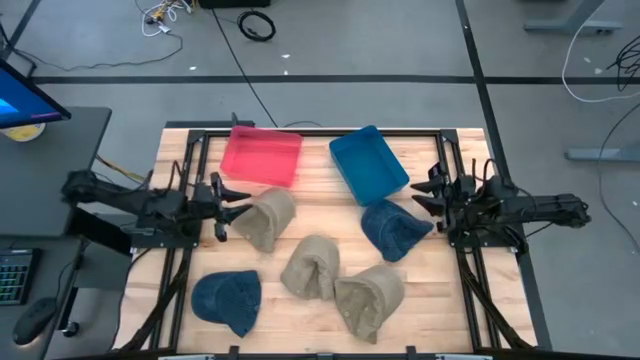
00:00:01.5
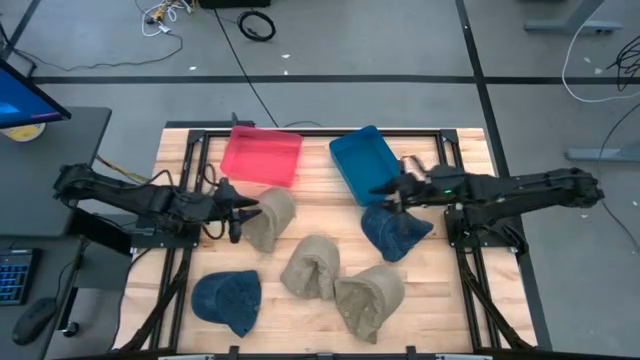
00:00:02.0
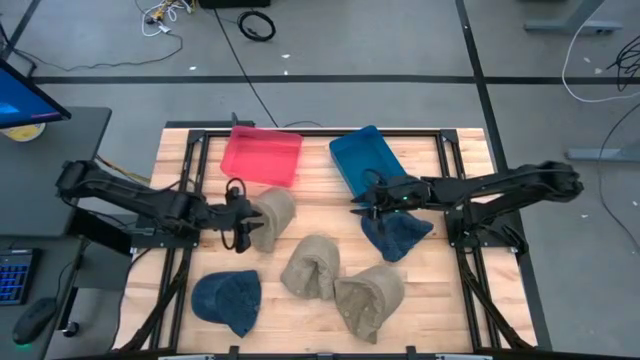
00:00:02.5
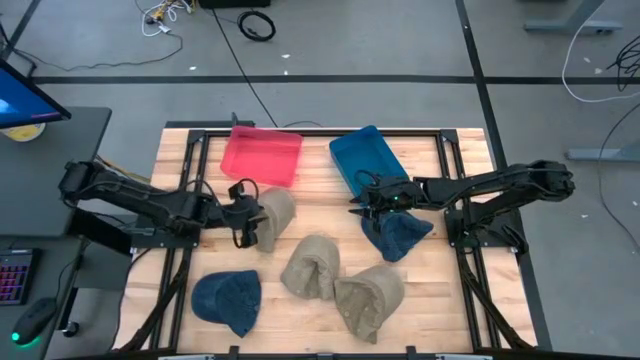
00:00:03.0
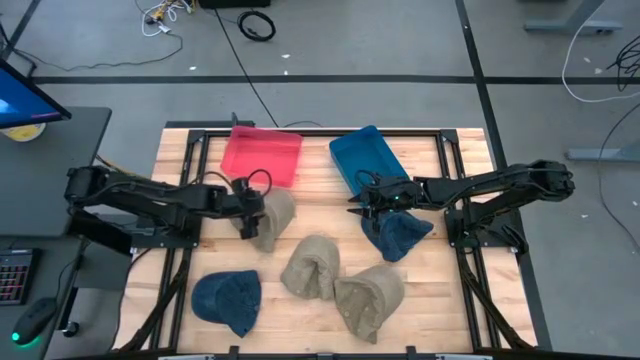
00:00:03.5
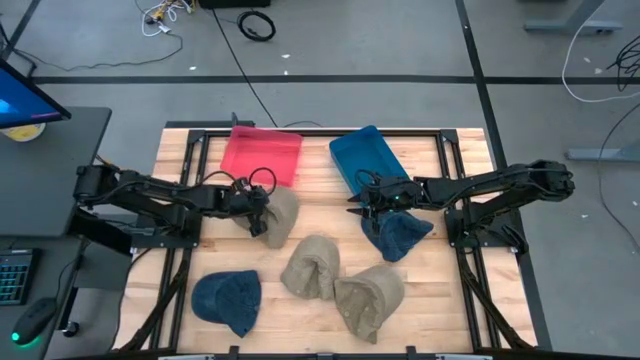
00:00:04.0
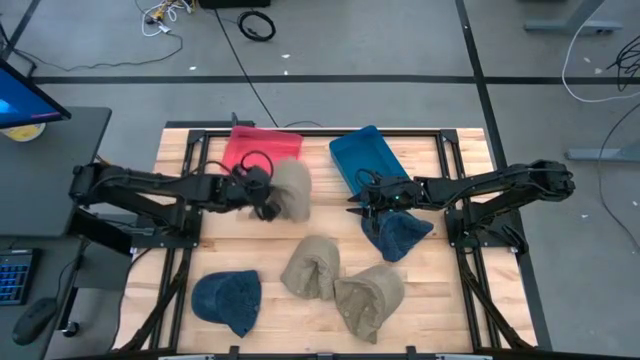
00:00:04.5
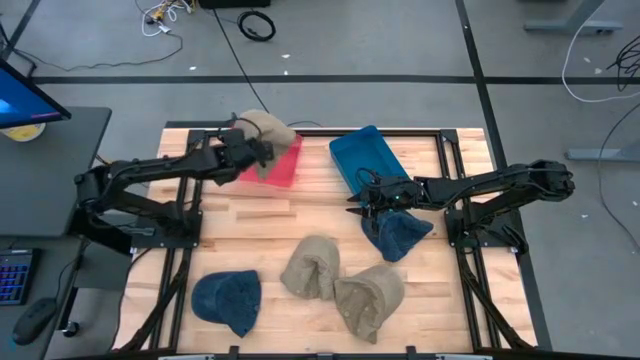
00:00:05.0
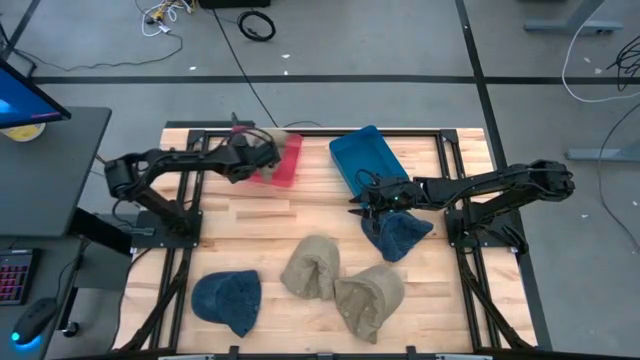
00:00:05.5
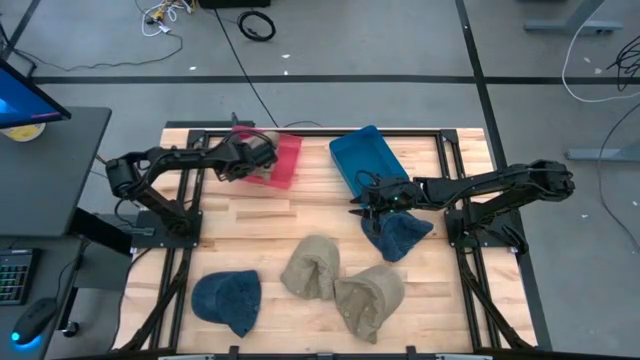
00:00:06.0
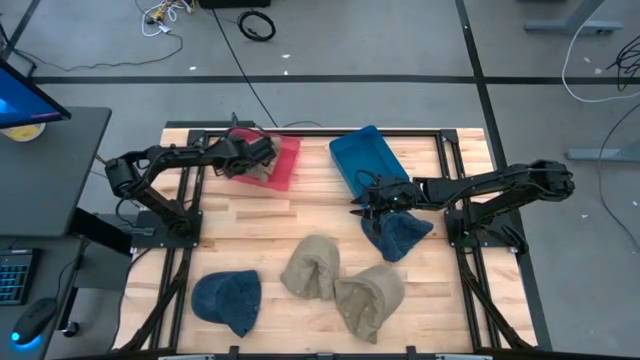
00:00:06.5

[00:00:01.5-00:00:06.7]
Task: Pick & Place hat
Put the top brown cap into the red bin

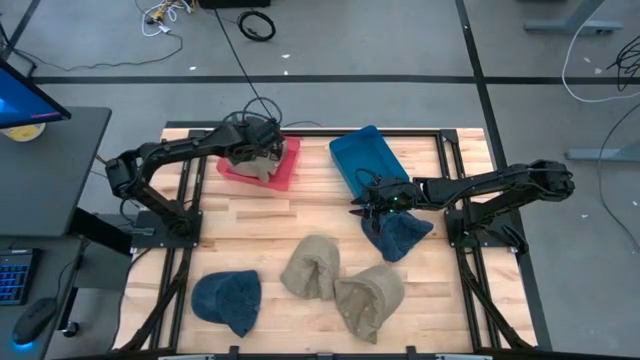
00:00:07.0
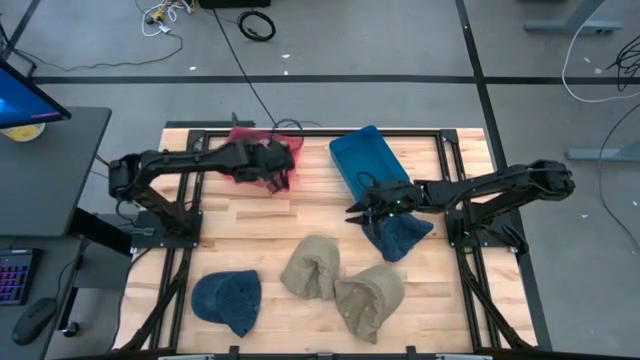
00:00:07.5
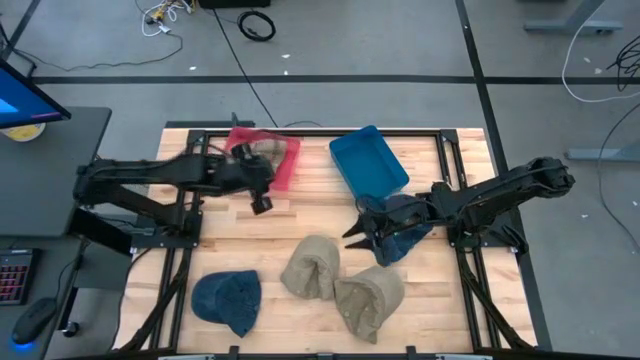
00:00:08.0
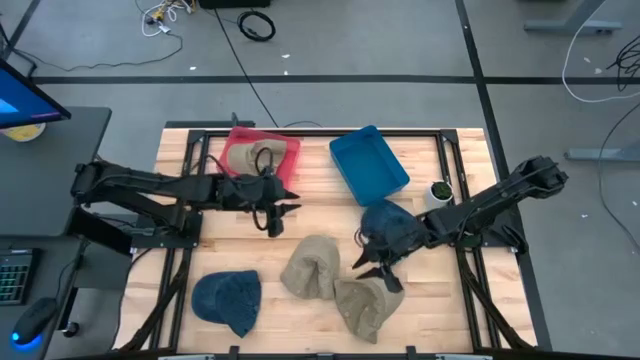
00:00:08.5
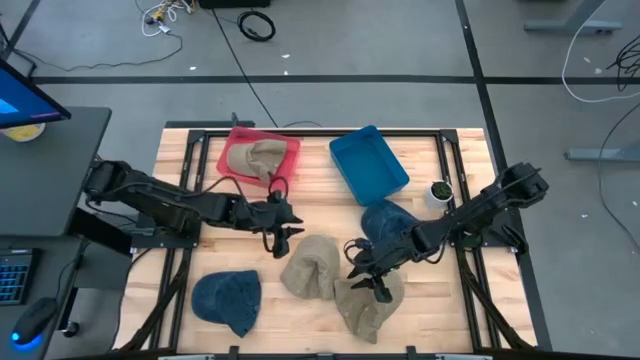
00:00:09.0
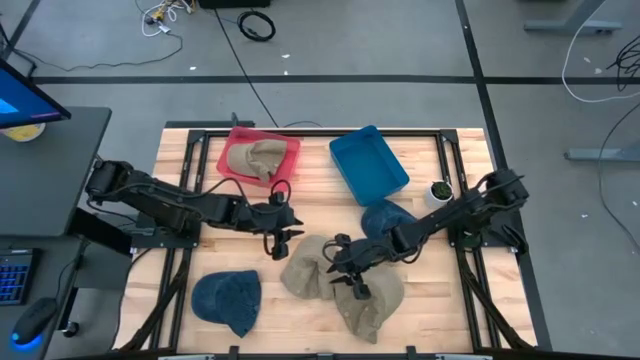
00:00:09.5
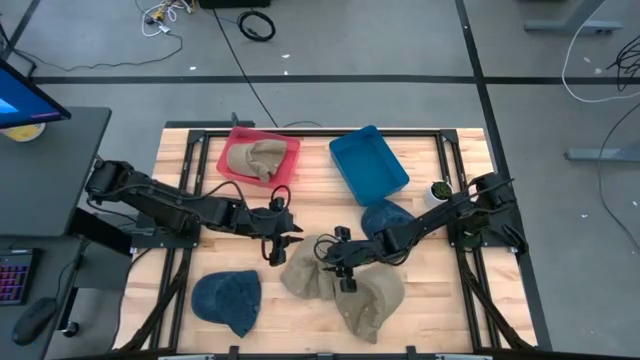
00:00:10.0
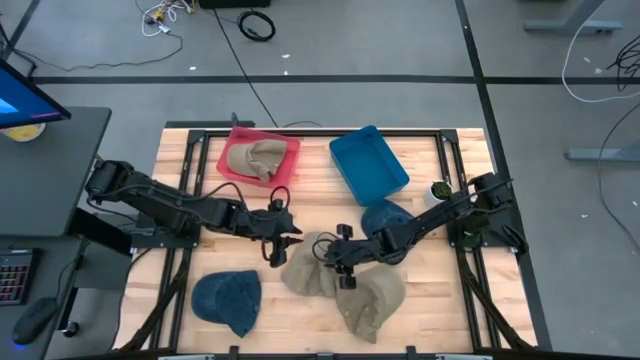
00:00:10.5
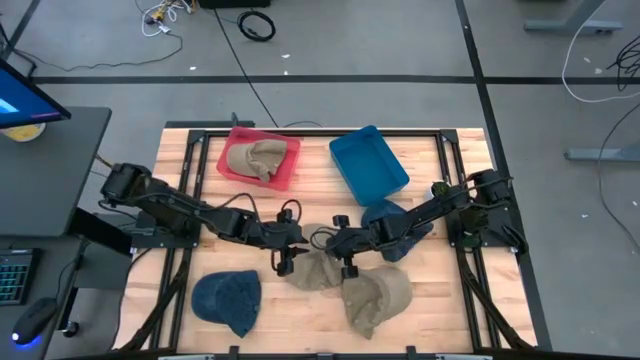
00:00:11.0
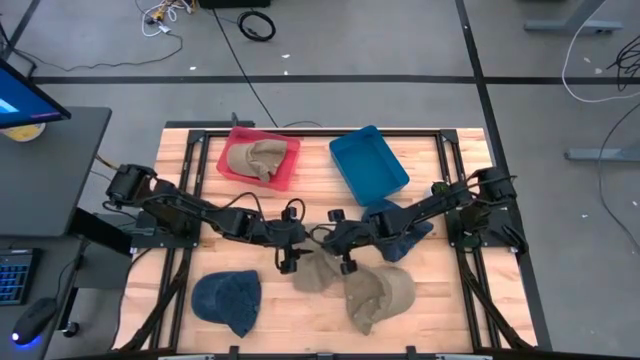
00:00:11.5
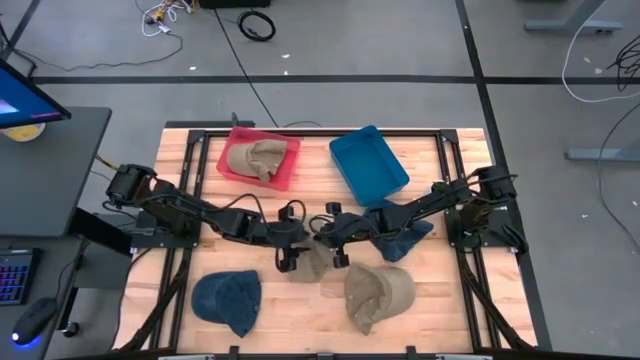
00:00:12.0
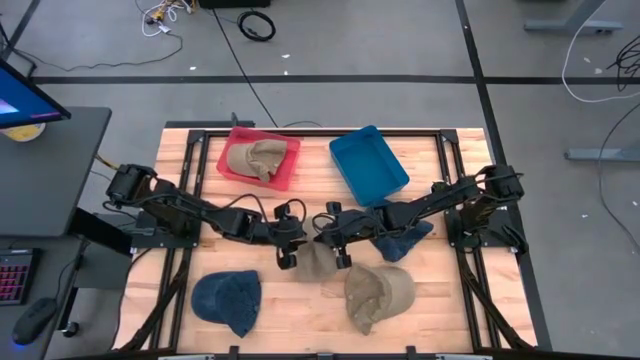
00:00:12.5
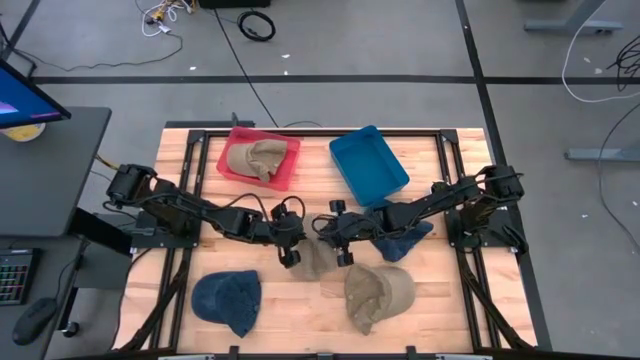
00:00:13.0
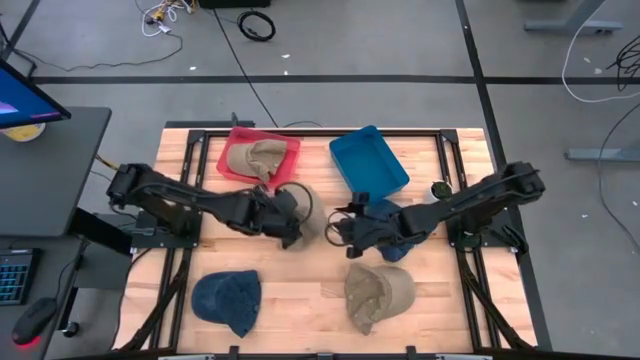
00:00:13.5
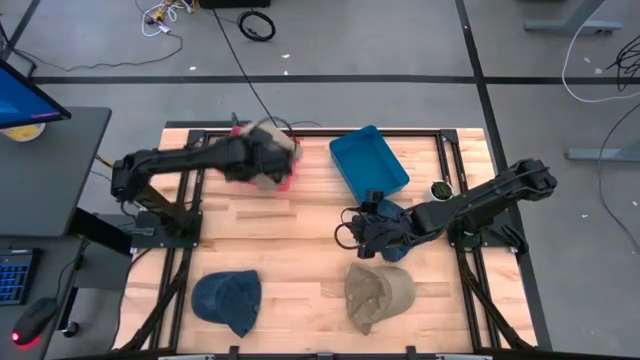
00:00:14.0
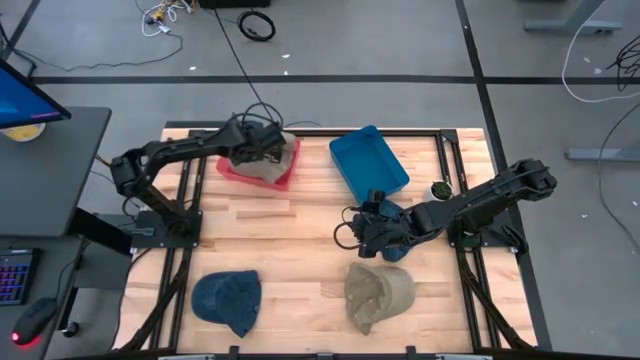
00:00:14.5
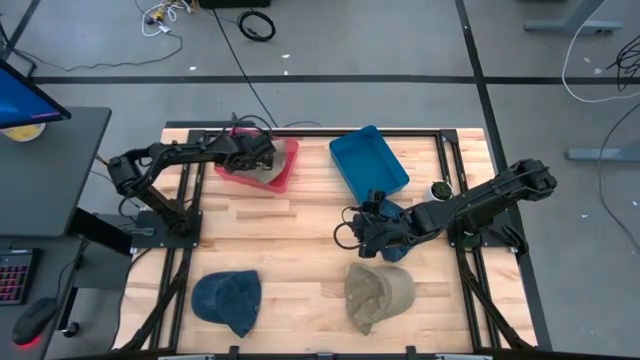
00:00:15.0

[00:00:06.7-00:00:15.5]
Put the left brown cap into the red bin

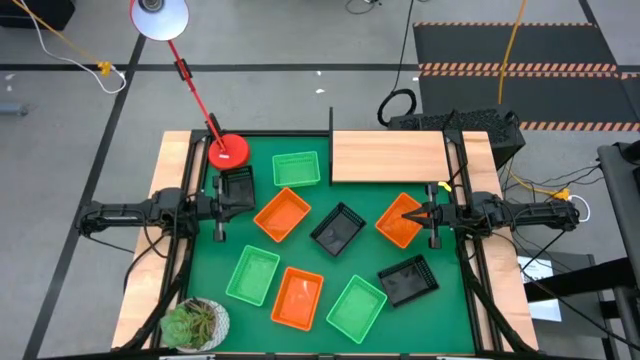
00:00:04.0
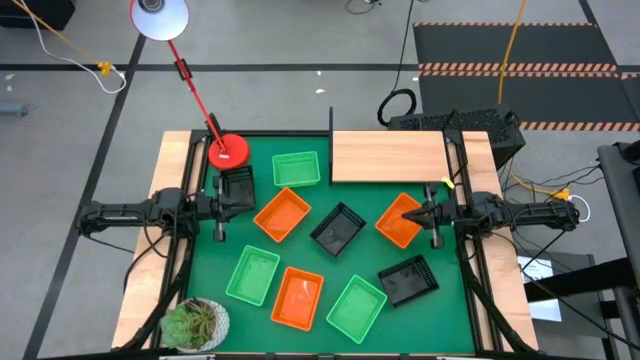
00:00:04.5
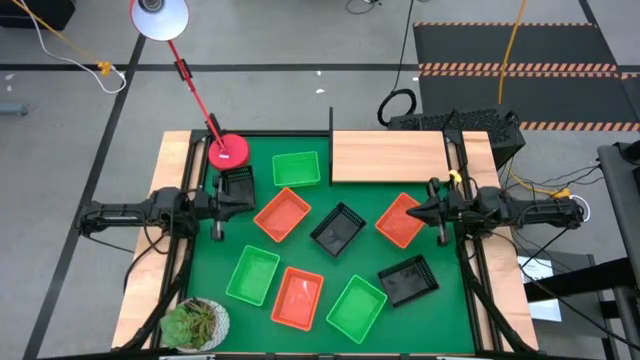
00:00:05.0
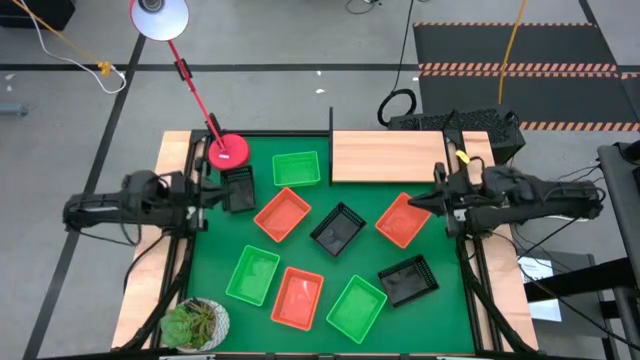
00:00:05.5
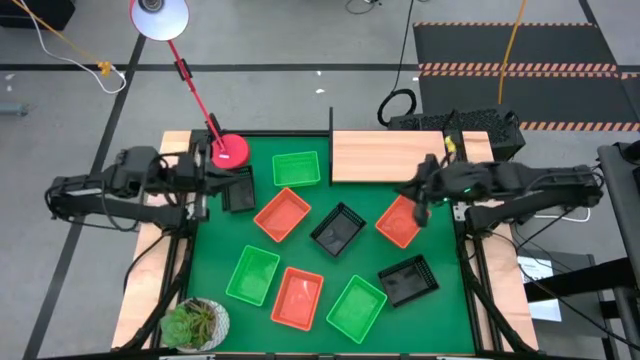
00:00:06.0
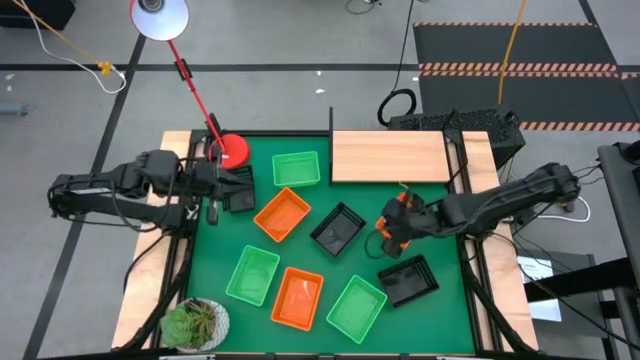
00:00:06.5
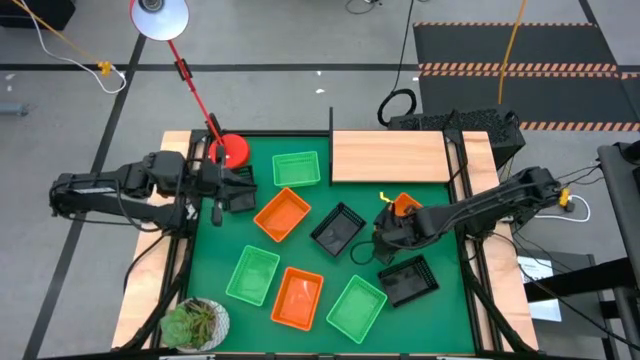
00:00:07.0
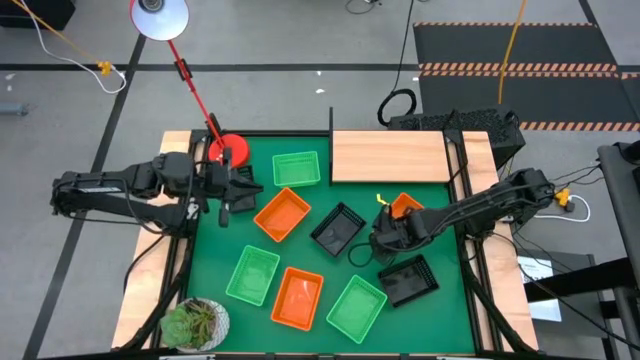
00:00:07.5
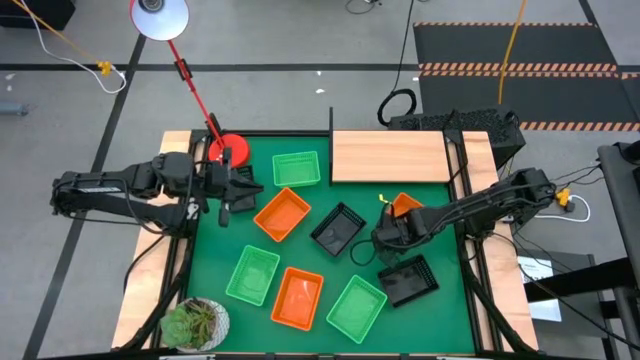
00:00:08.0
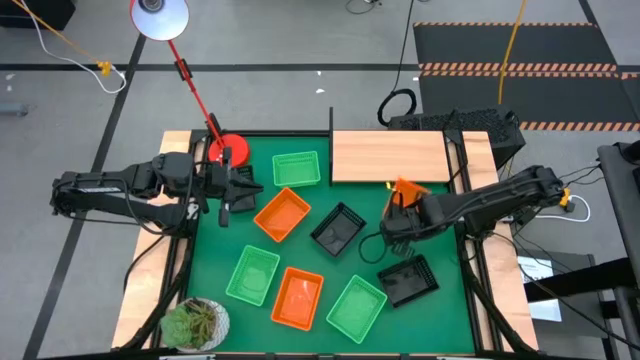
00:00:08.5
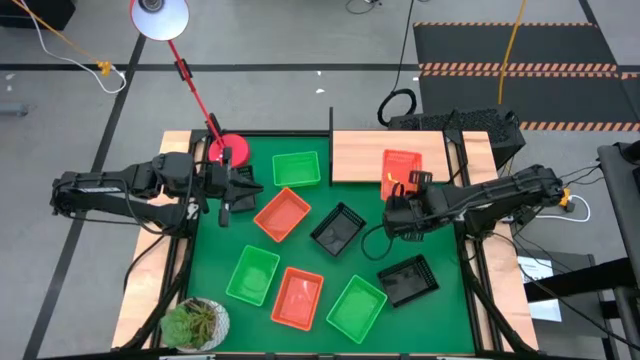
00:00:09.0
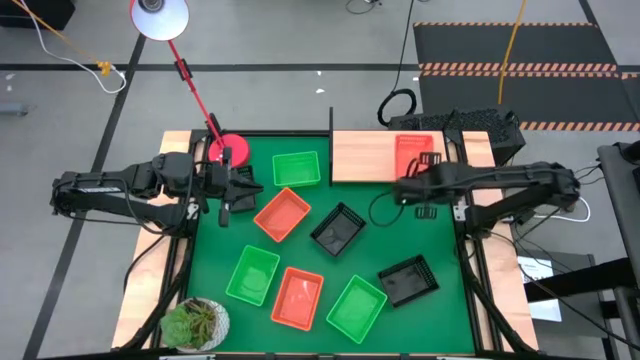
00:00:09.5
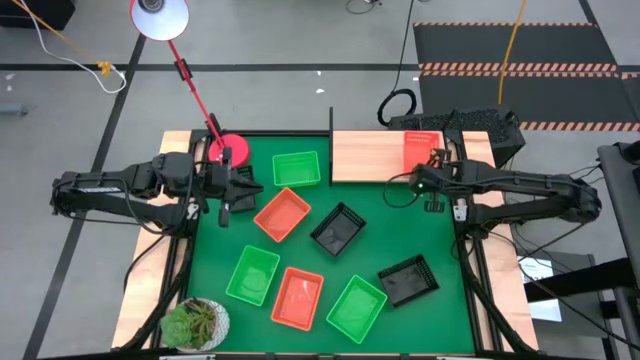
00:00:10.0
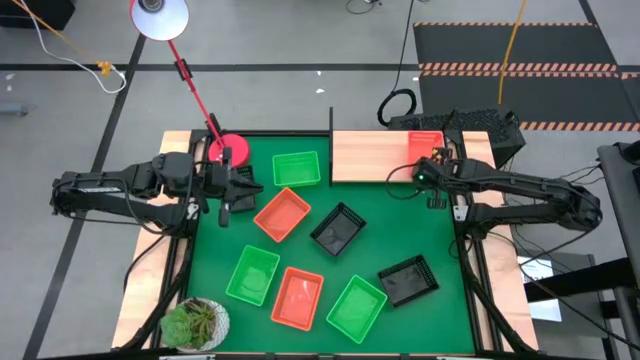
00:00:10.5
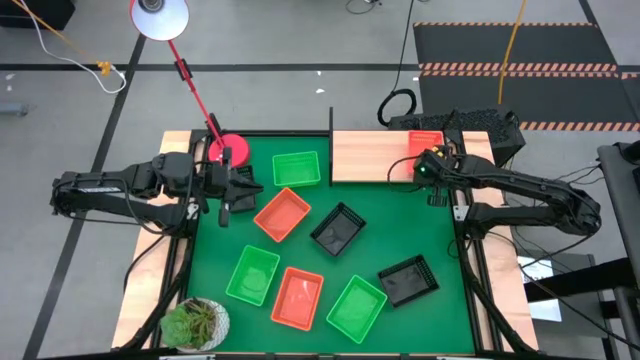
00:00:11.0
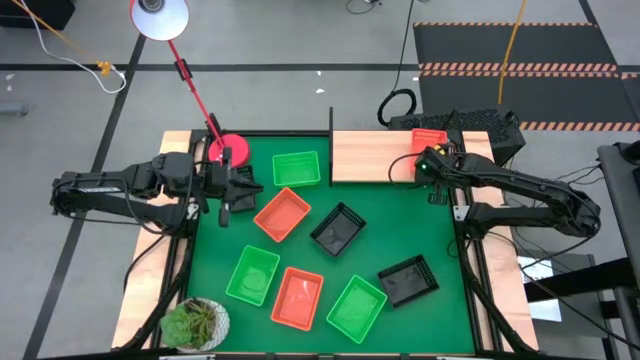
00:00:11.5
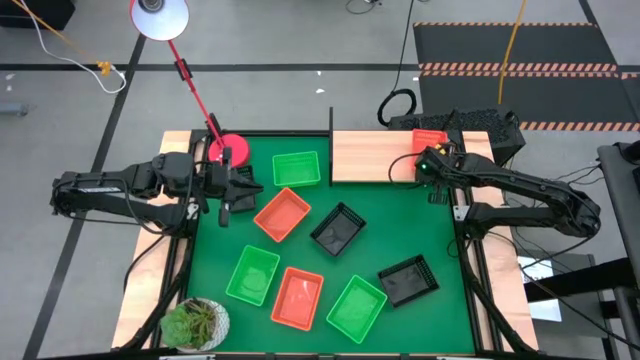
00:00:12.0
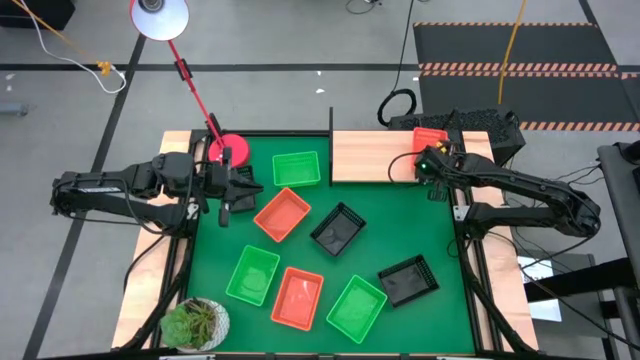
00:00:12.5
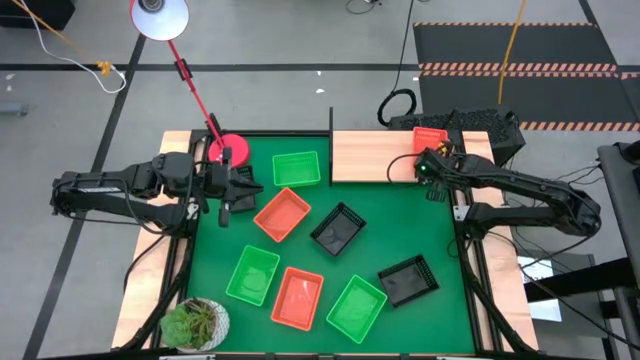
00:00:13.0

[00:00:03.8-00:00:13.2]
Task: Stack baskets on shelf by color
Put the top right orange bin on the shelf
